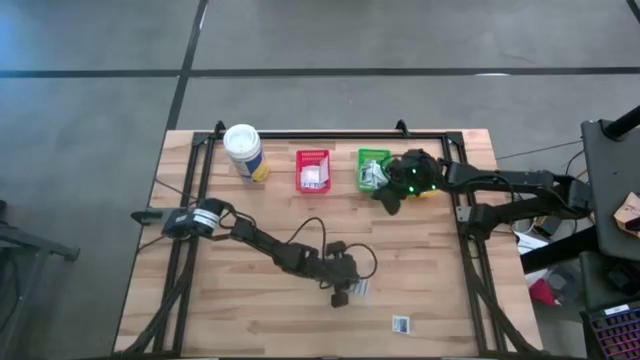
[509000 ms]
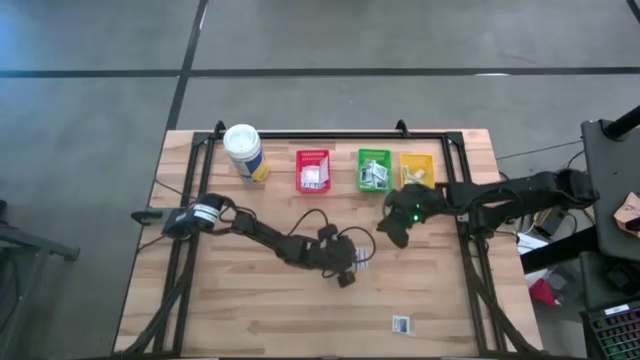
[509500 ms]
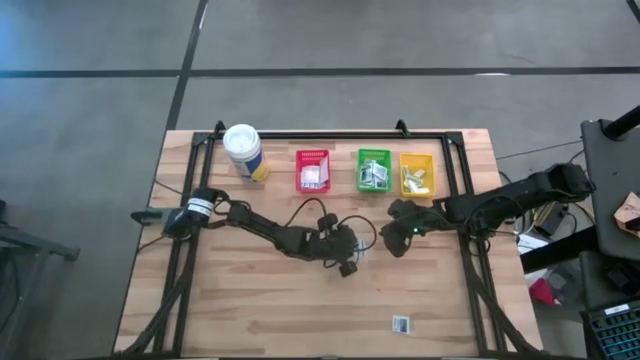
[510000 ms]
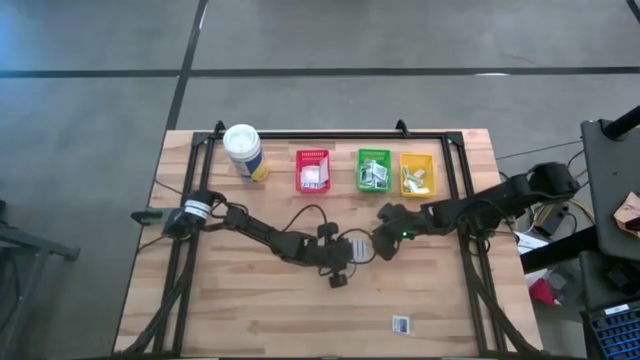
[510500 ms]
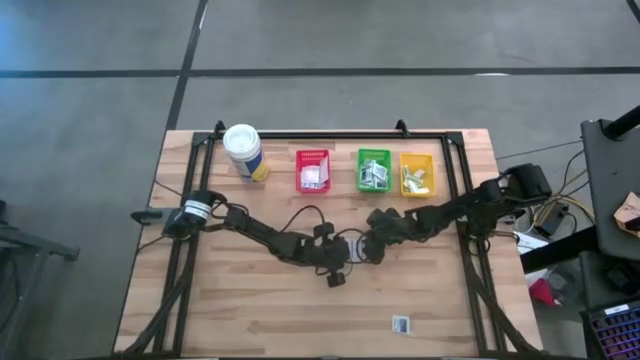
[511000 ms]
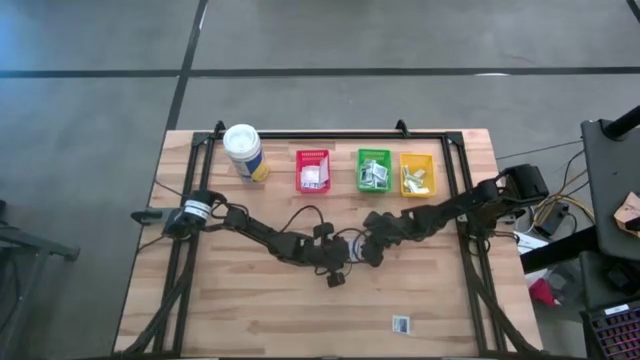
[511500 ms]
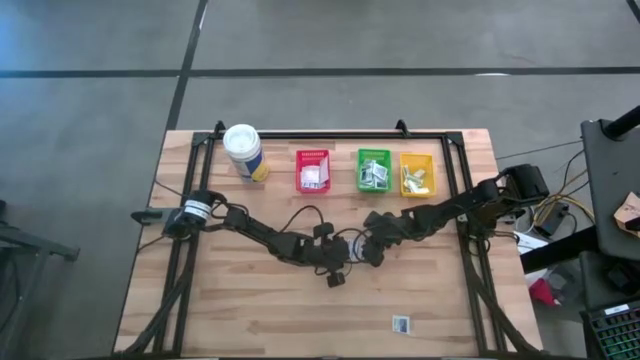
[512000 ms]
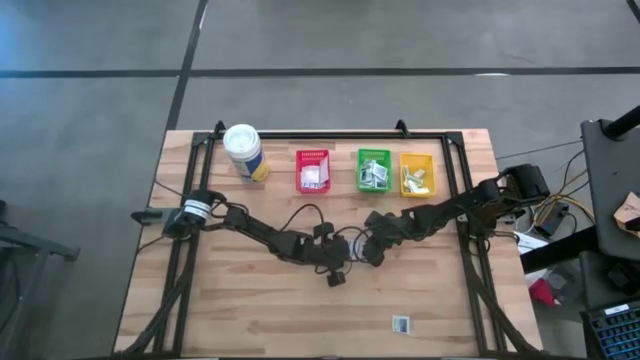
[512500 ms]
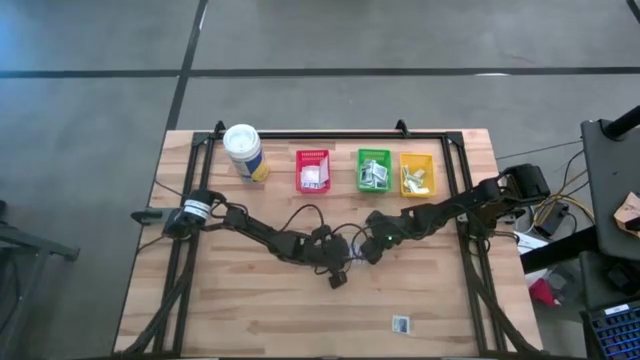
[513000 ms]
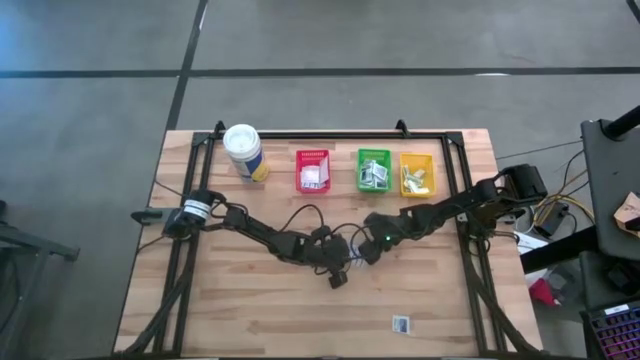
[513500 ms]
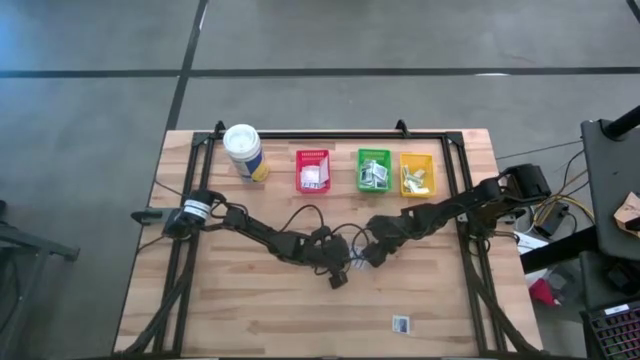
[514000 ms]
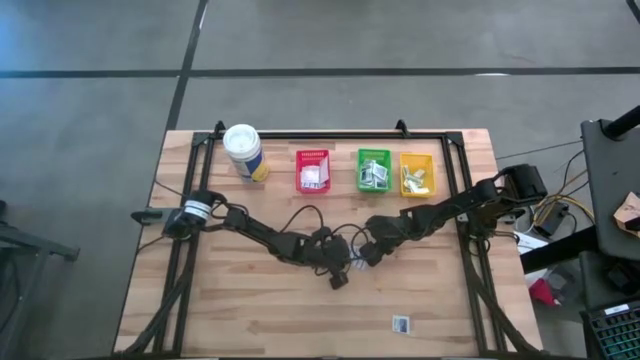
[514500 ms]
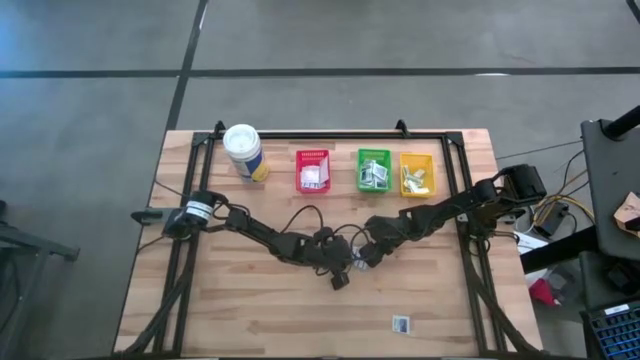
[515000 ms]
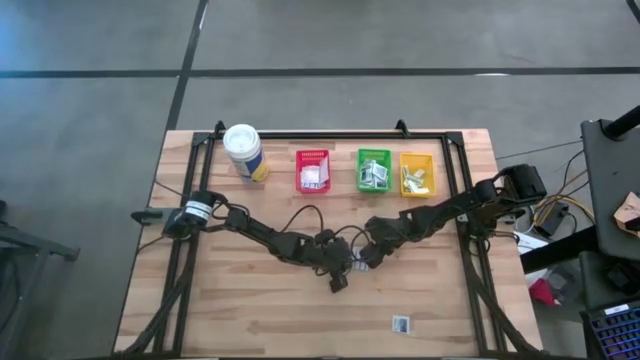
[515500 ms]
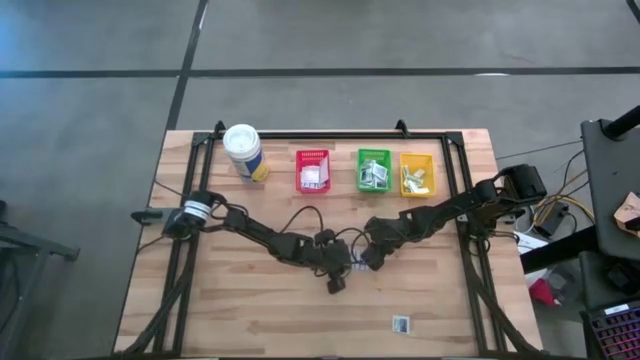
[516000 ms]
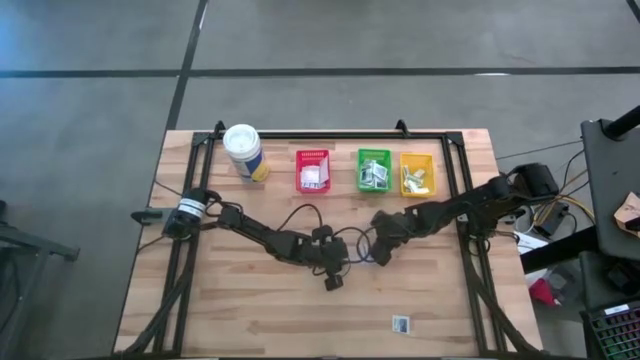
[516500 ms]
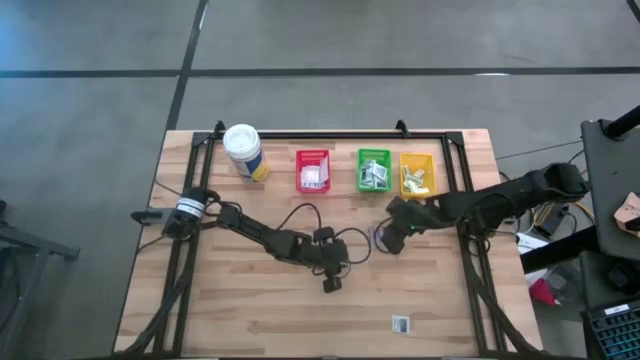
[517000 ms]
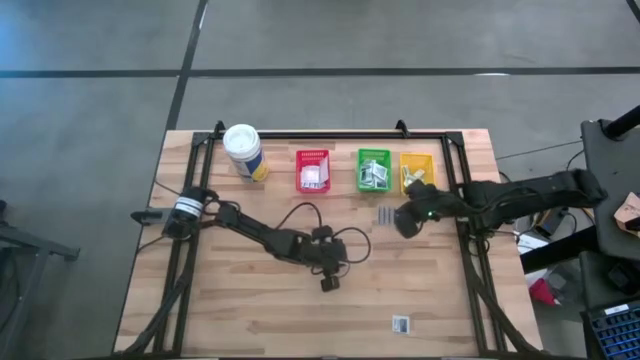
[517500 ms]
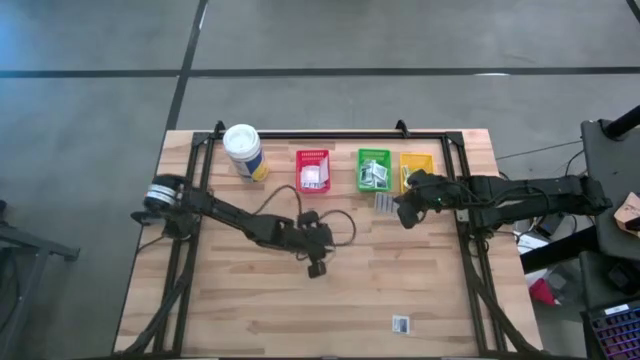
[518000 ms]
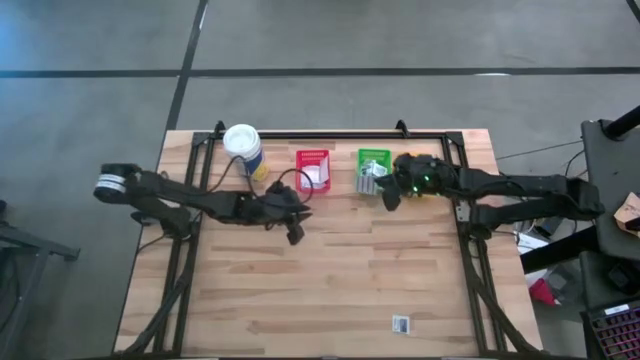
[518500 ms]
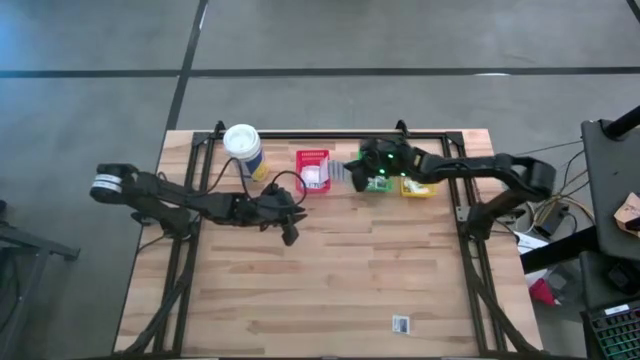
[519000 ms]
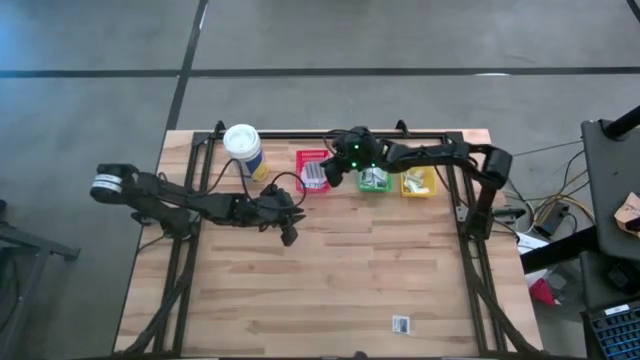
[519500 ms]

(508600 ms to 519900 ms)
Task: Pick & Place First Aid Supplies
Put the blue bandage in the red bin

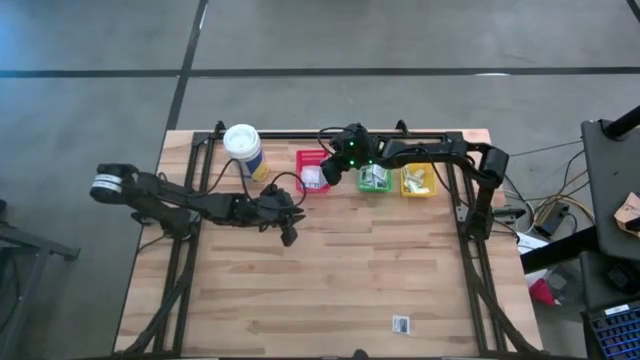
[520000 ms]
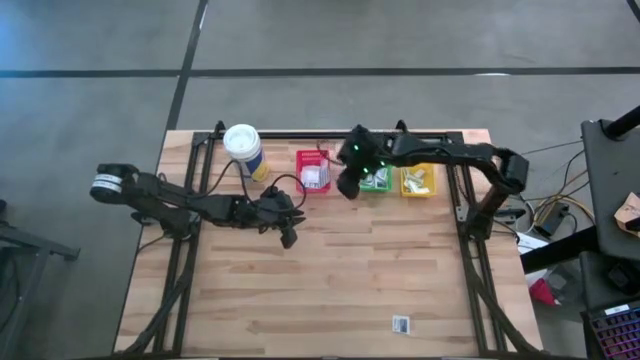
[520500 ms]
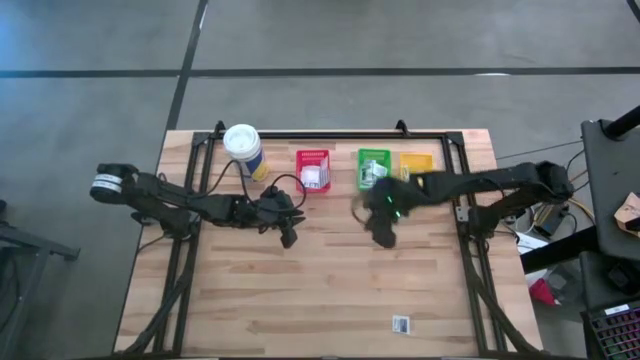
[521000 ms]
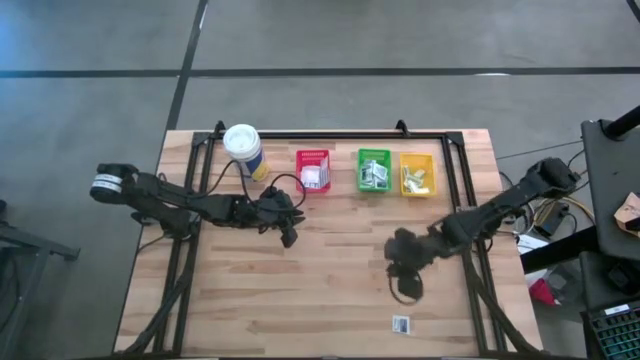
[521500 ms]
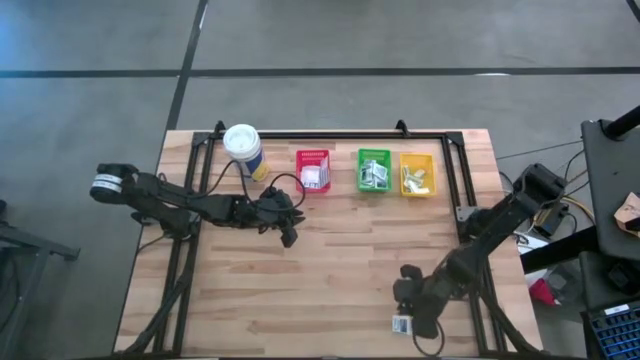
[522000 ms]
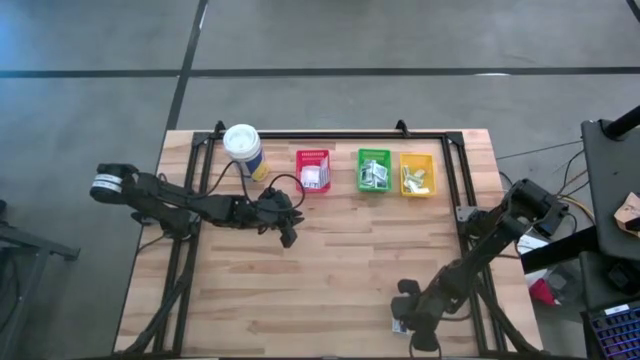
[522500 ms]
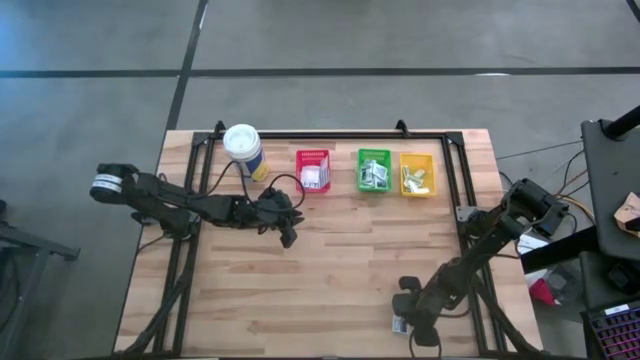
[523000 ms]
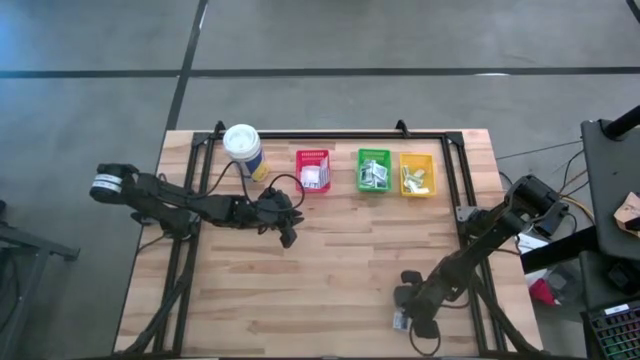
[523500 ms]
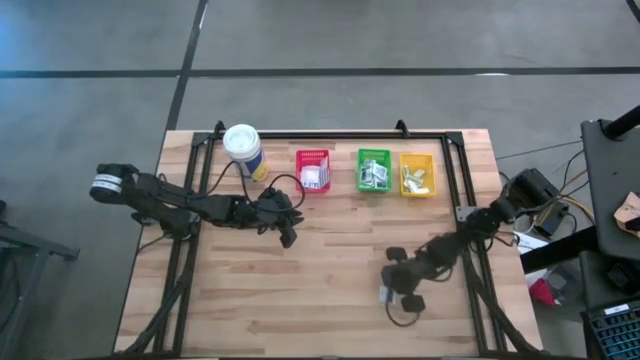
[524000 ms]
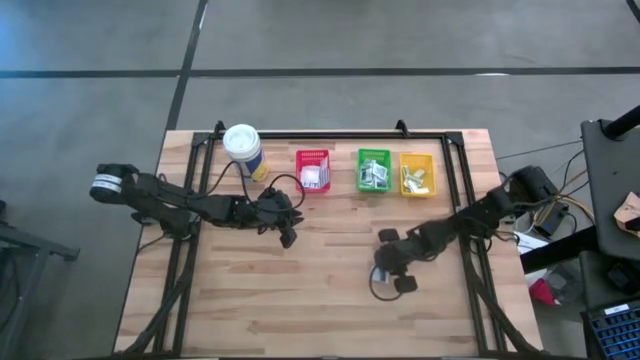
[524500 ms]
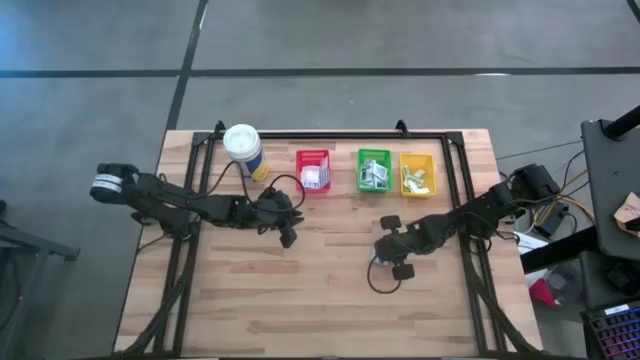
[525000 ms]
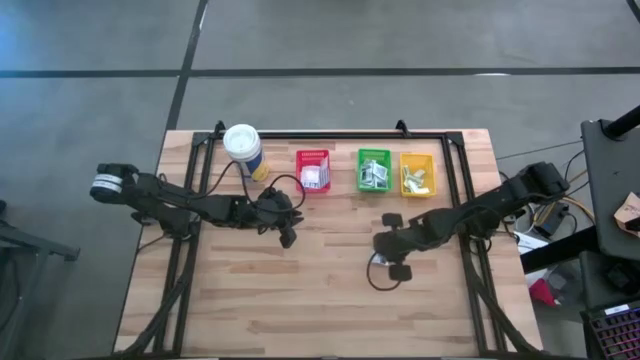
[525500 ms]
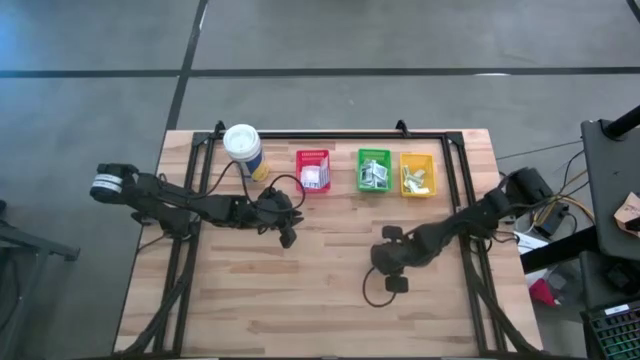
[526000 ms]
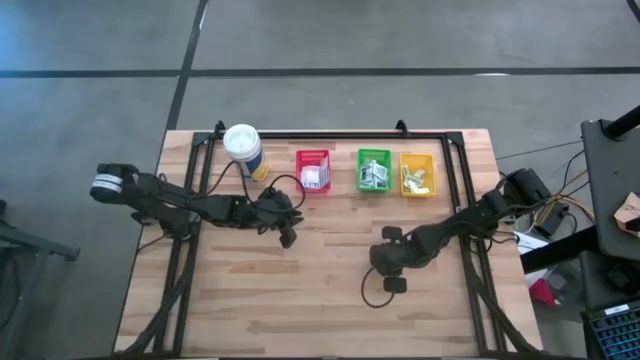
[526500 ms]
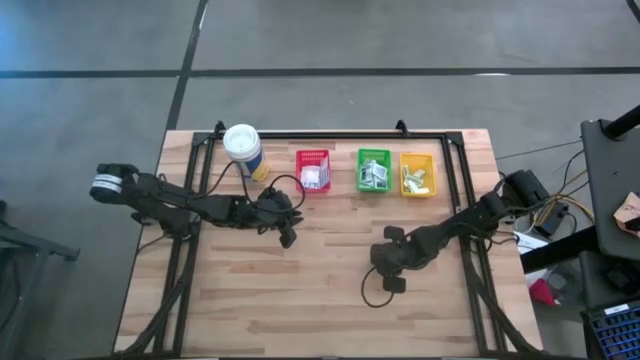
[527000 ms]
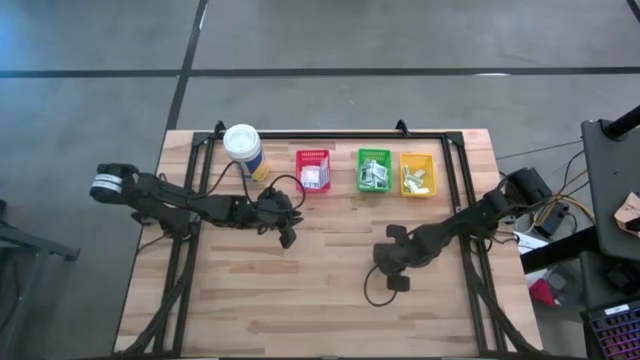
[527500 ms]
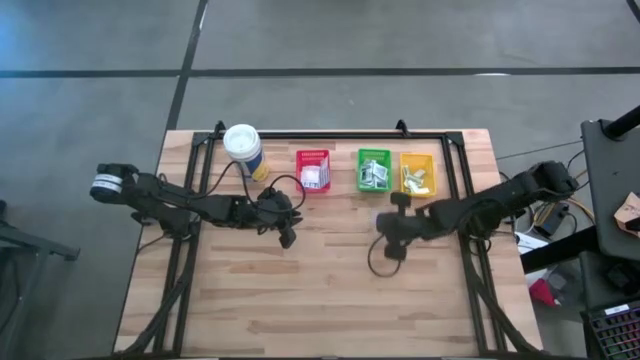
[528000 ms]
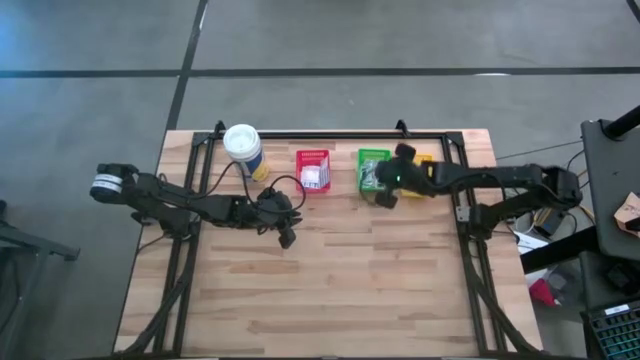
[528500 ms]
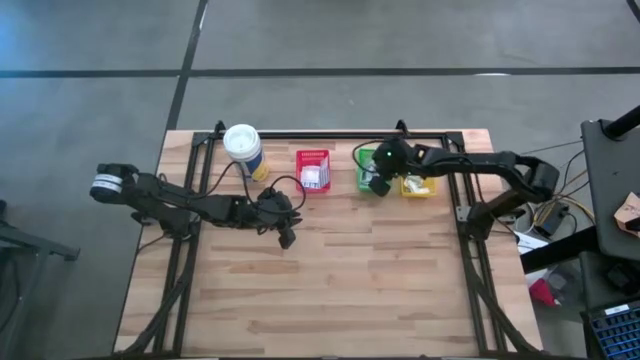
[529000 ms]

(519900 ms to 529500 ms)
Put the alcohol pad in the green bin
